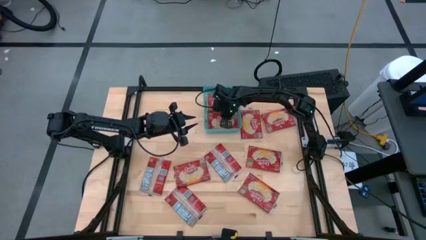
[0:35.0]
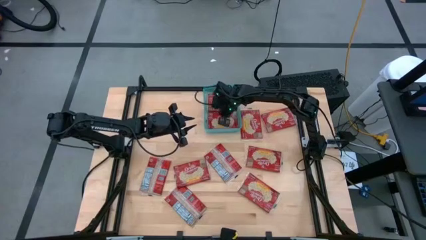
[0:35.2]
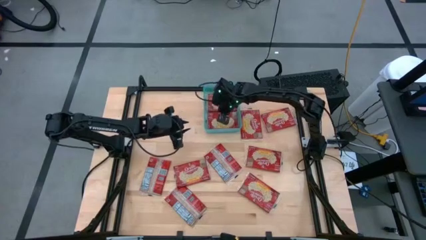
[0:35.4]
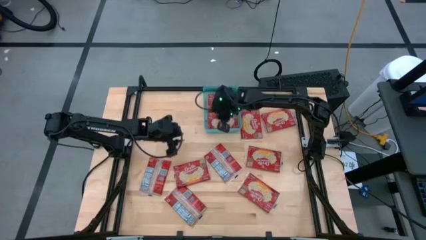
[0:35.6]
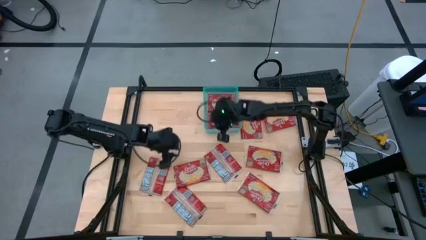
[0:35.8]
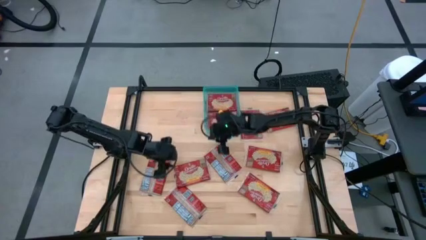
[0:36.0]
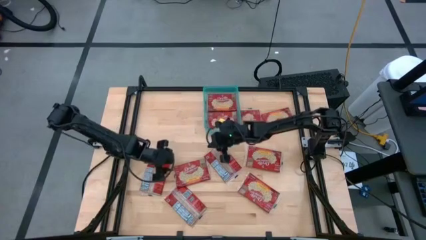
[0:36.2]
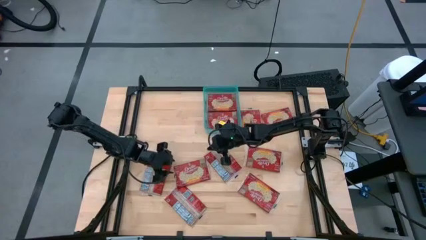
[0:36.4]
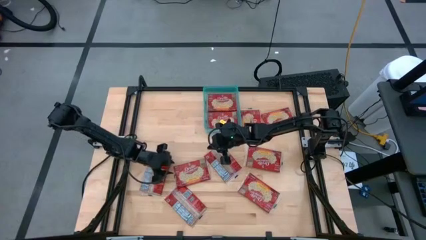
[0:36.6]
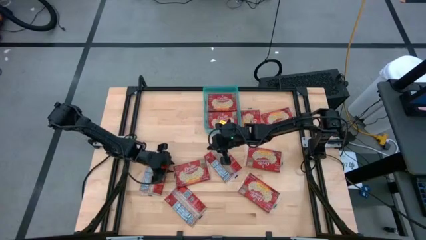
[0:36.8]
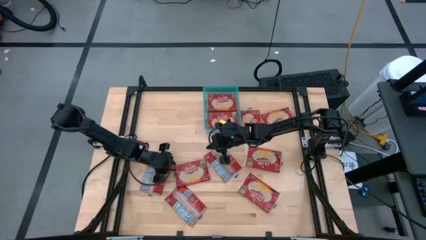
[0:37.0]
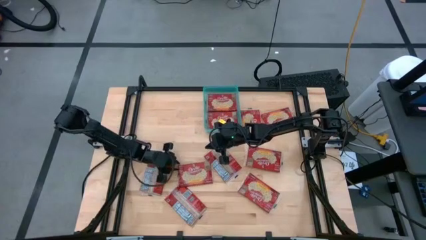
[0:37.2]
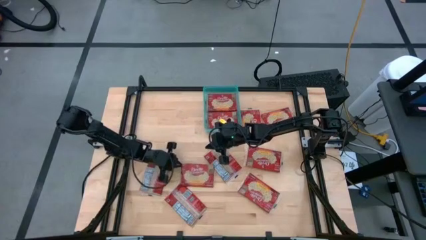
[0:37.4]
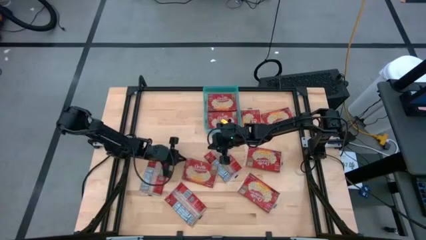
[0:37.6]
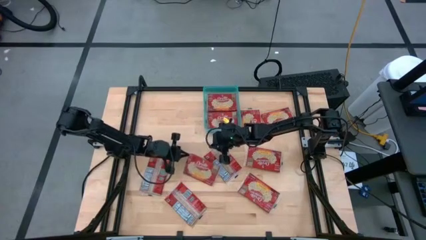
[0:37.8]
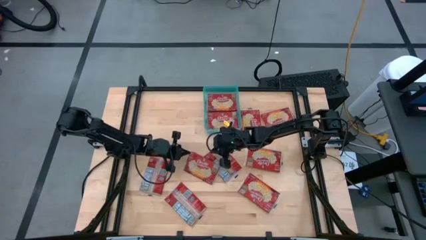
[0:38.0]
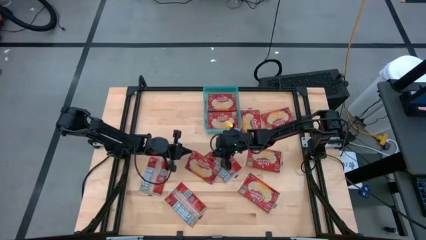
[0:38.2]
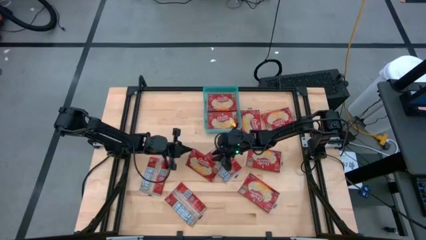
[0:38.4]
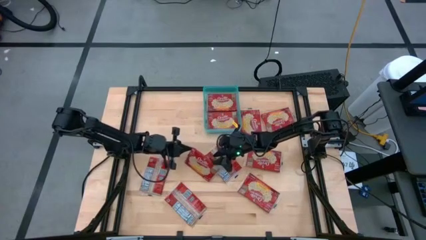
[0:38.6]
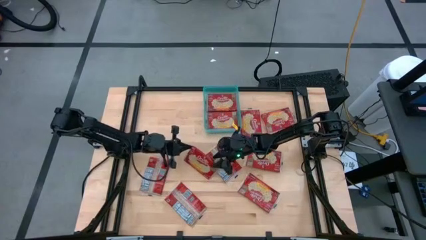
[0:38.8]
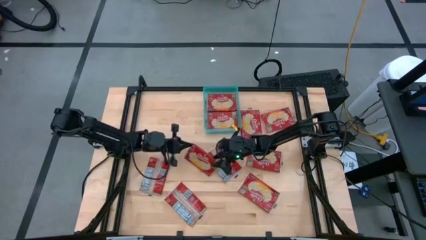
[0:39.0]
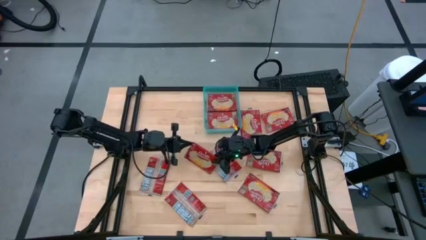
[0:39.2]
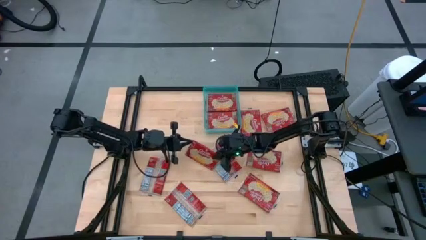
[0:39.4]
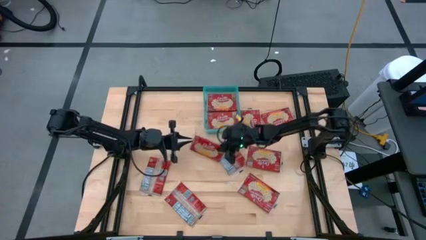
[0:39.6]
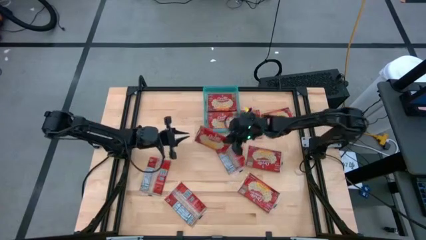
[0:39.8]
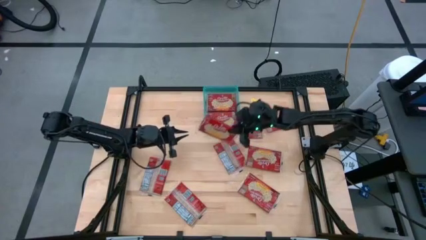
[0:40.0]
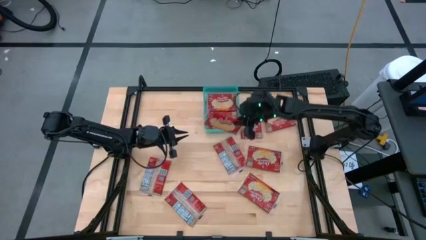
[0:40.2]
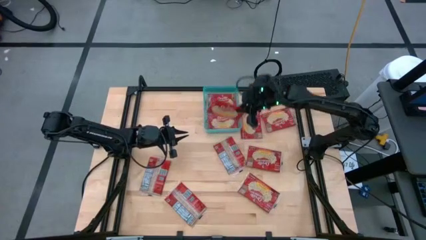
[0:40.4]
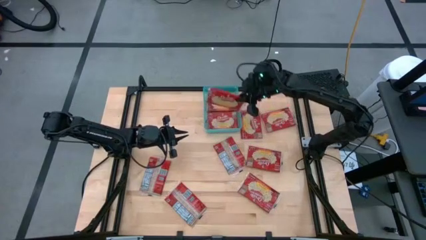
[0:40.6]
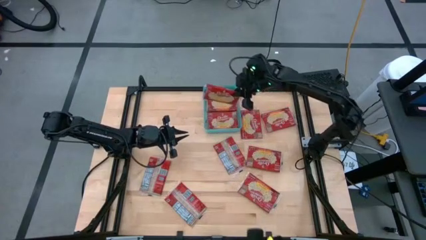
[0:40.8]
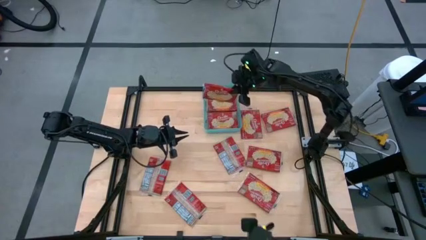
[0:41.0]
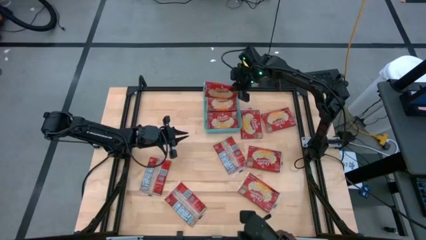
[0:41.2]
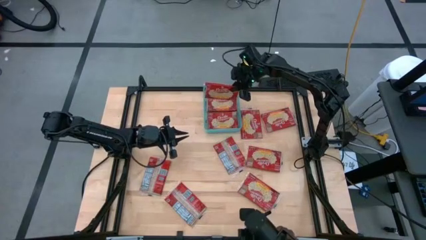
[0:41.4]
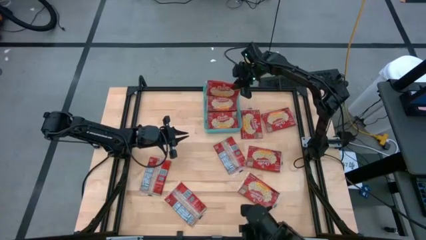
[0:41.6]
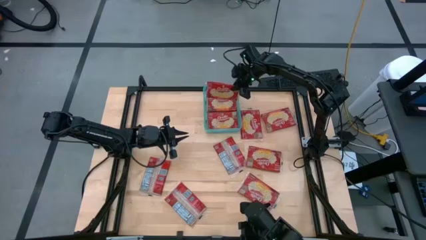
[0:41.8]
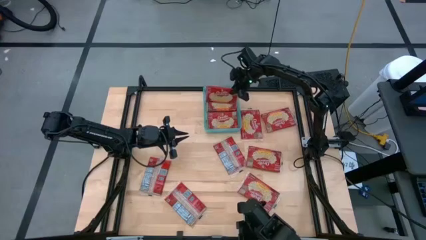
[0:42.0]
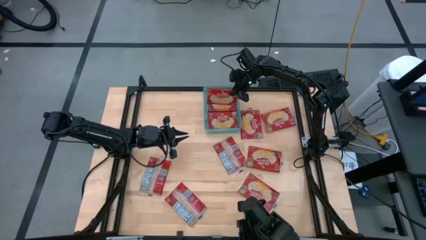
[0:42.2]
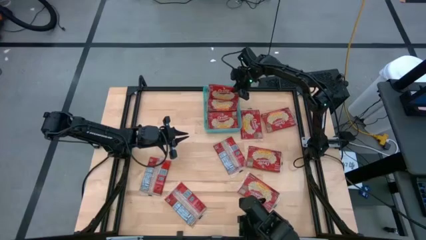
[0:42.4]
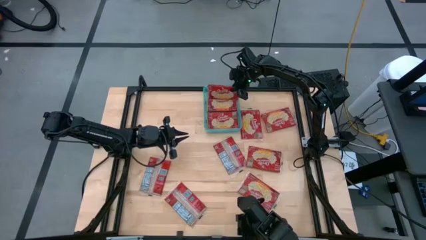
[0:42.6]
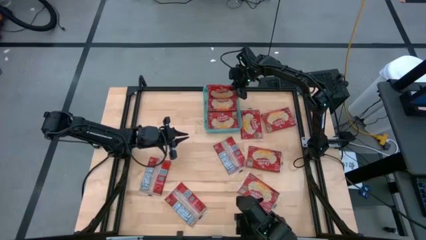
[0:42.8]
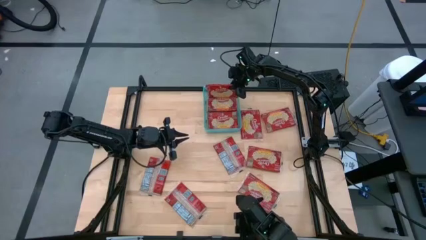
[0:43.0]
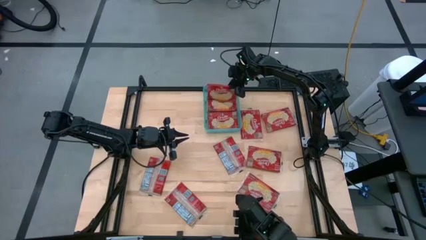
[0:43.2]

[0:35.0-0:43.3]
Task: Sort popcorn bags into baskets
Put the red popcorn bag into the blue bin

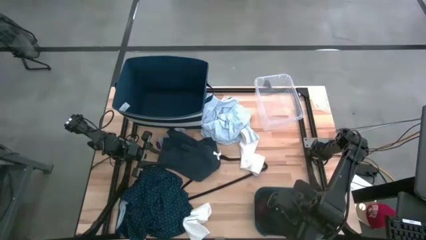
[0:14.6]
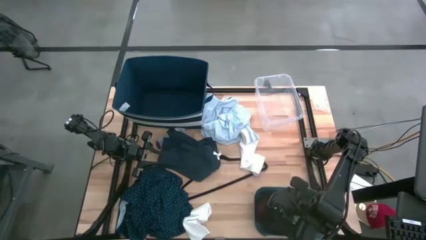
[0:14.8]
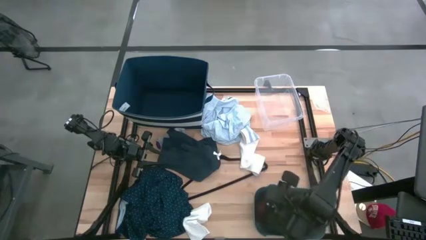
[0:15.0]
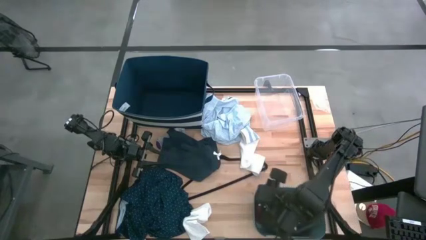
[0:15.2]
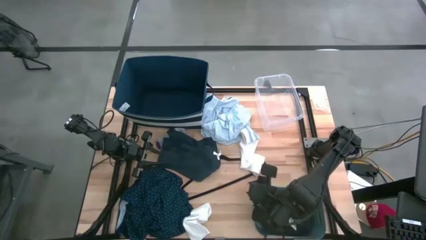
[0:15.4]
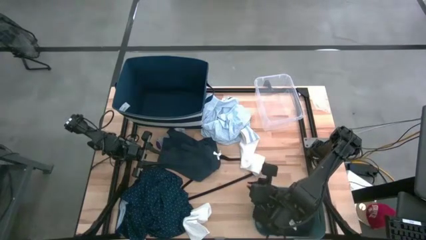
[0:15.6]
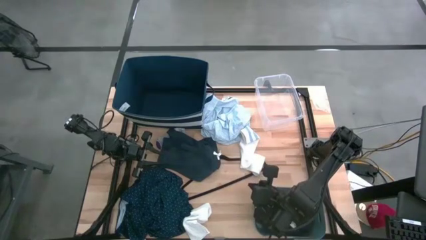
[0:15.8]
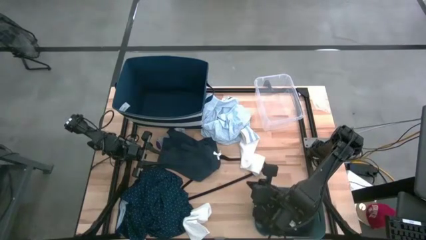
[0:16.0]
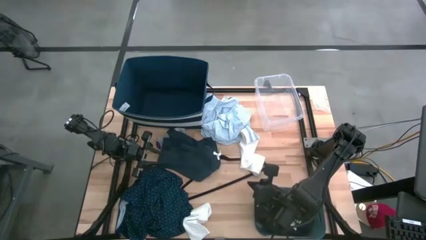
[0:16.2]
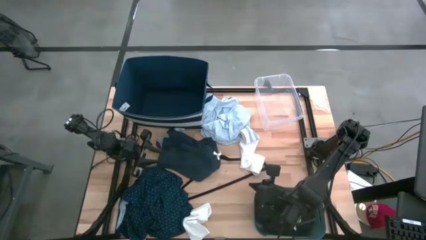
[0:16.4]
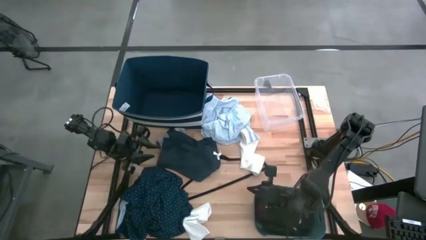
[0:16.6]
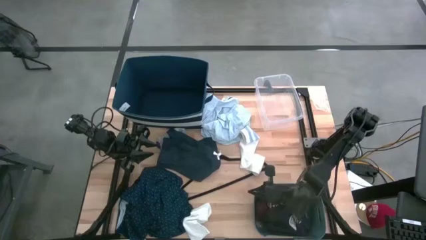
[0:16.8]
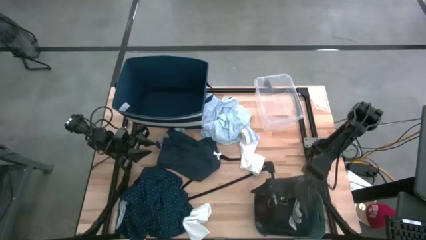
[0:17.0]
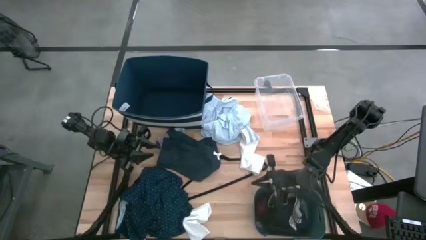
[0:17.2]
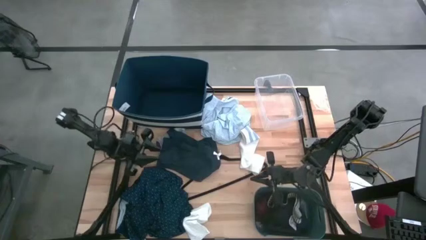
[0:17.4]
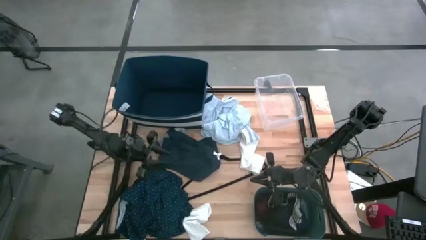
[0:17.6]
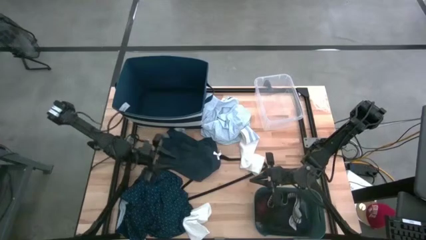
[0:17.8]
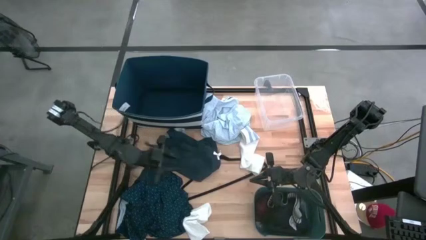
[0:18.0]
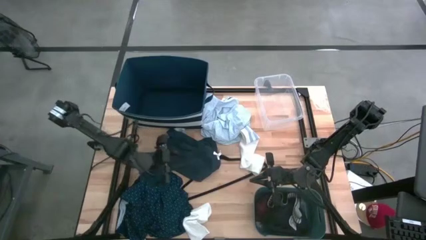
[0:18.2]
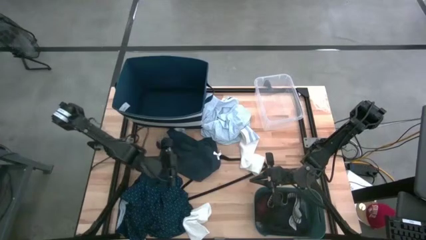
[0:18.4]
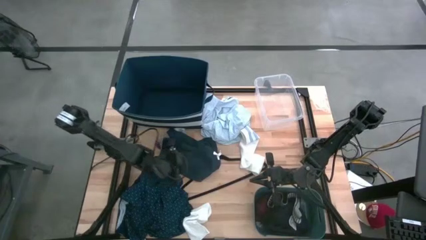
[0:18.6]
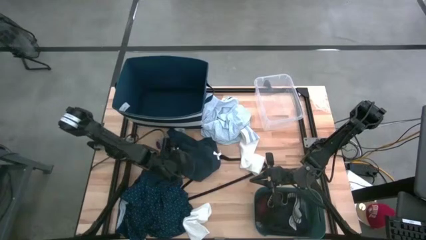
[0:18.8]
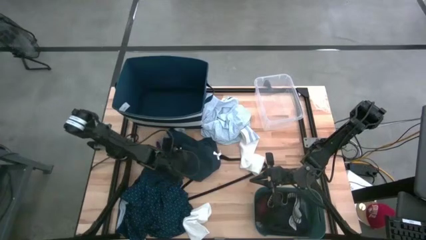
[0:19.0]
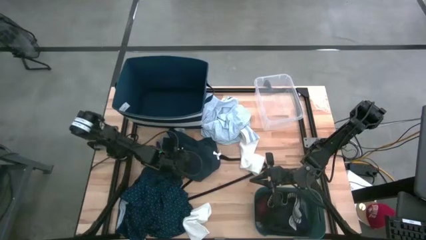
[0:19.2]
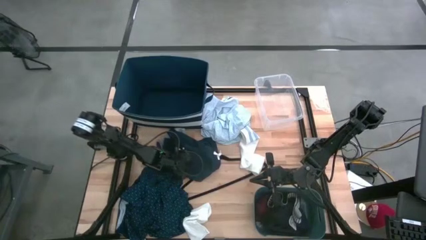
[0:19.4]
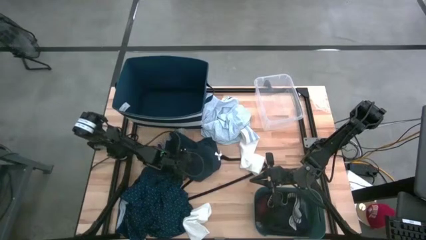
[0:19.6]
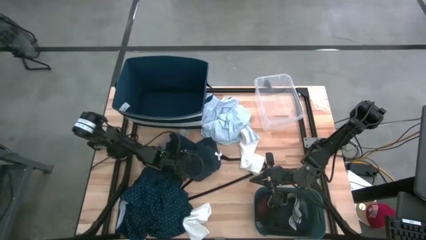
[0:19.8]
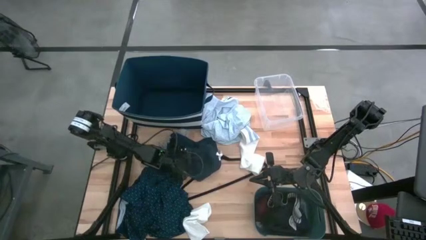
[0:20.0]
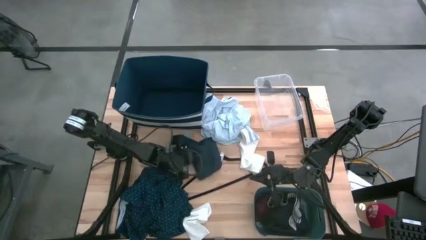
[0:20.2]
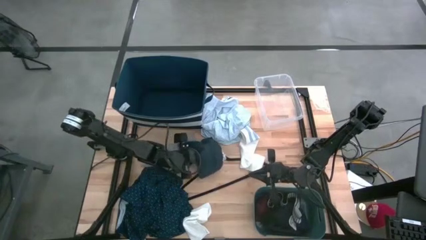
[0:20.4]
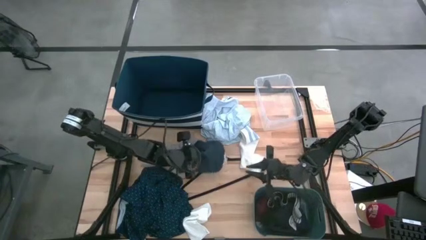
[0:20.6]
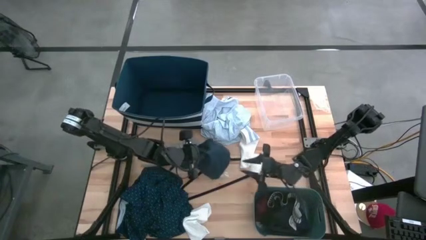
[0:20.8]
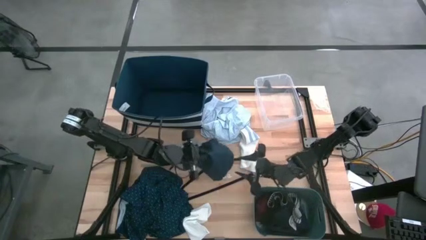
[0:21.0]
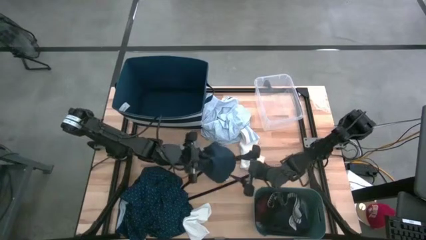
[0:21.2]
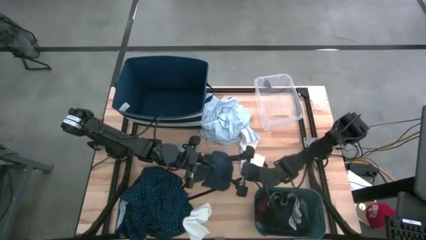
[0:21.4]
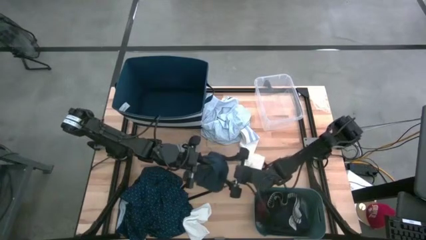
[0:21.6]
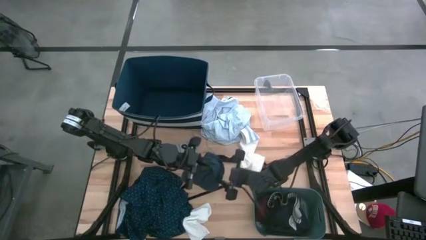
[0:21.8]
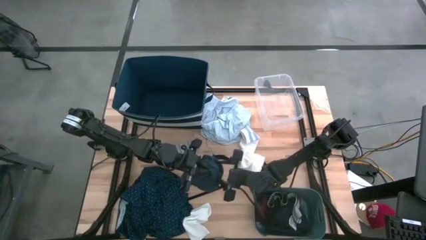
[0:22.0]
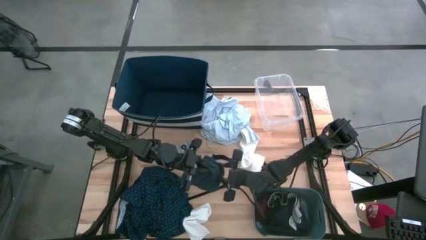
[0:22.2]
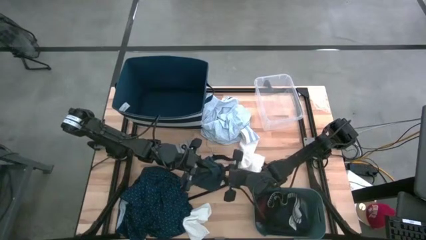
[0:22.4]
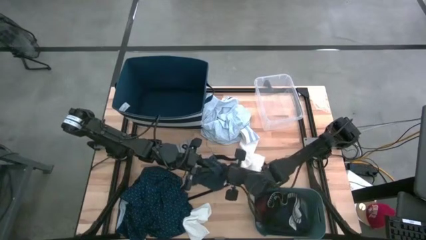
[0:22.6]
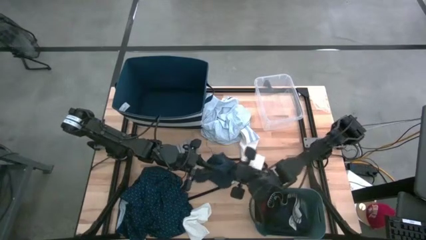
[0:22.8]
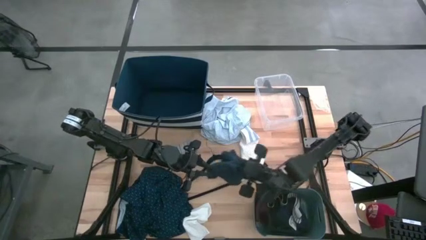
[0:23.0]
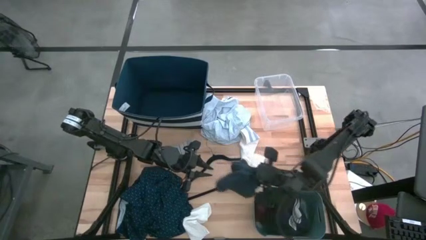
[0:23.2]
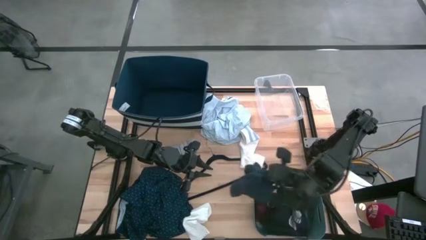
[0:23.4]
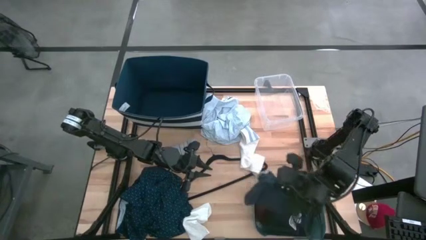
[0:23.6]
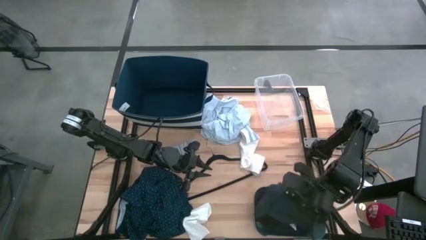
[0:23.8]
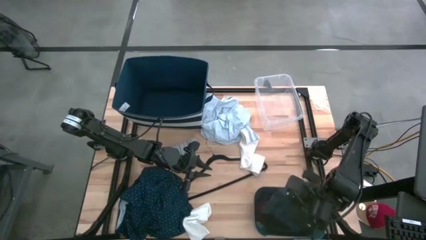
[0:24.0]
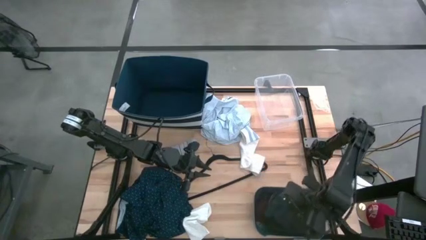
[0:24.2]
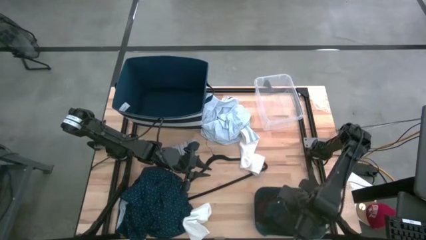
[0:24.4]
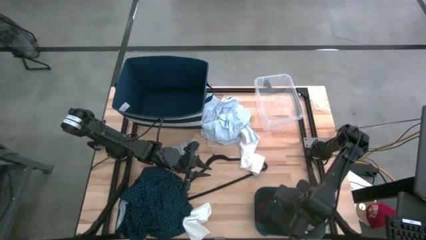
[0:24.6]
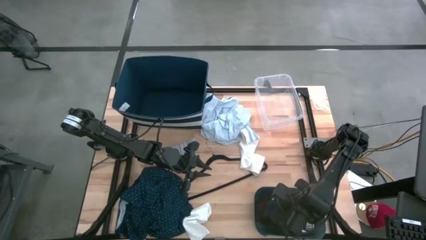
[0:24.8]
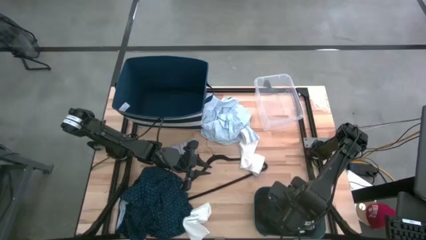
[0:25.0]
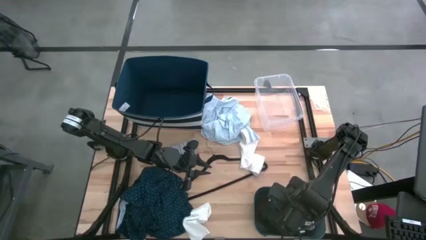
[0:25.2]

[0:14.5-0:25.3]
Task: Pick & Place Cloths
Put the gray shorts into the green bin
